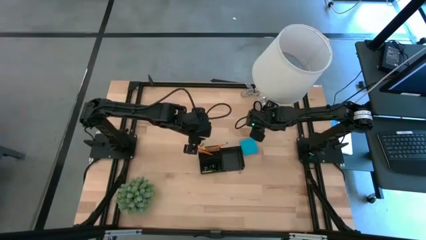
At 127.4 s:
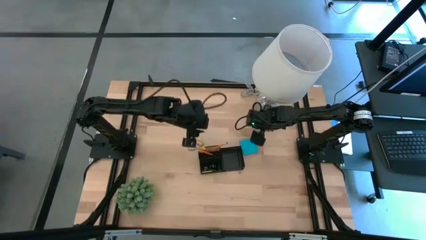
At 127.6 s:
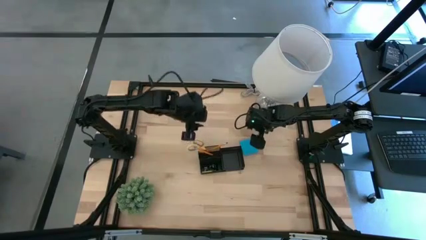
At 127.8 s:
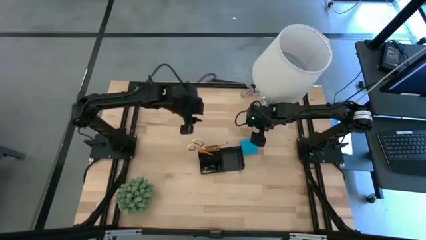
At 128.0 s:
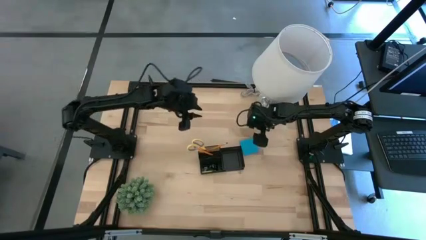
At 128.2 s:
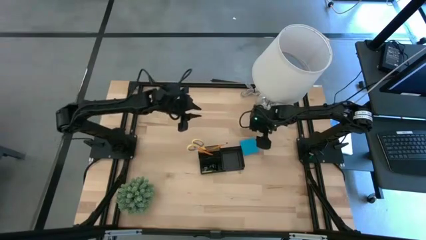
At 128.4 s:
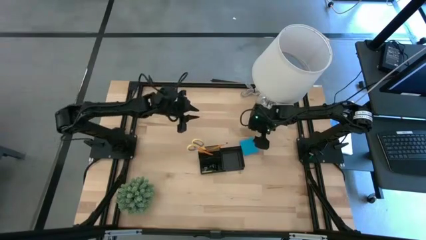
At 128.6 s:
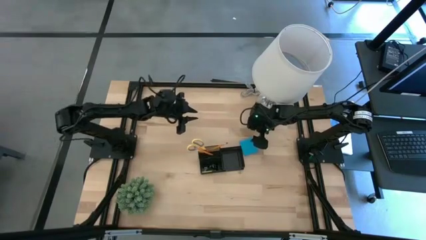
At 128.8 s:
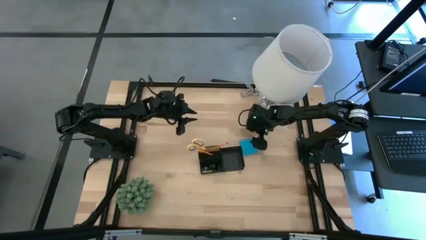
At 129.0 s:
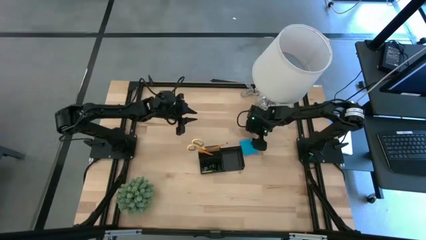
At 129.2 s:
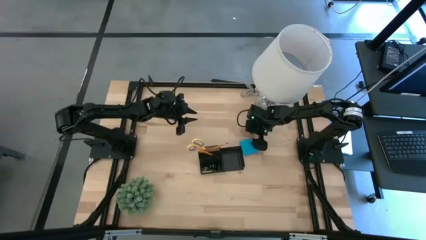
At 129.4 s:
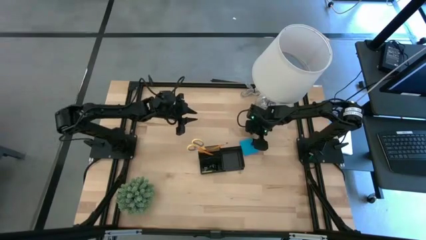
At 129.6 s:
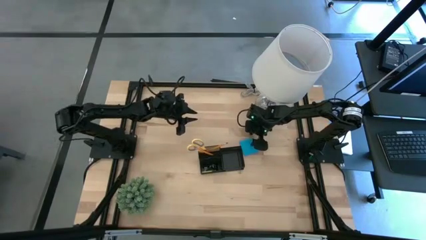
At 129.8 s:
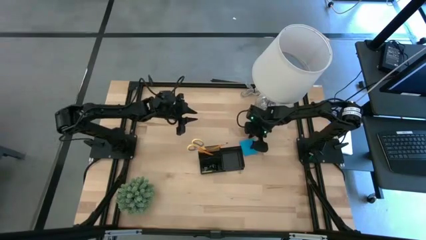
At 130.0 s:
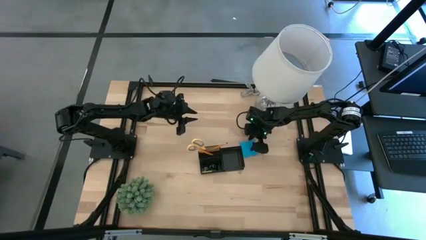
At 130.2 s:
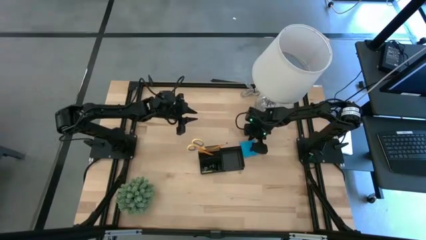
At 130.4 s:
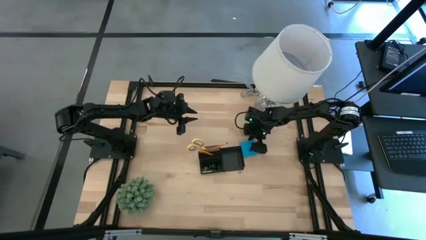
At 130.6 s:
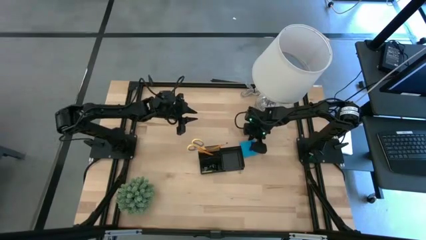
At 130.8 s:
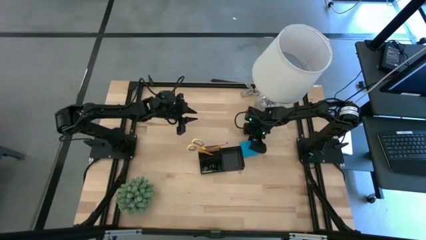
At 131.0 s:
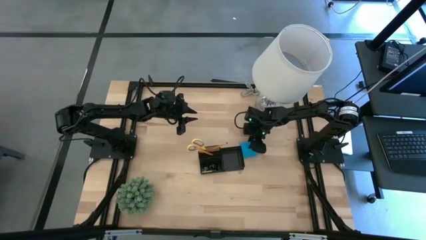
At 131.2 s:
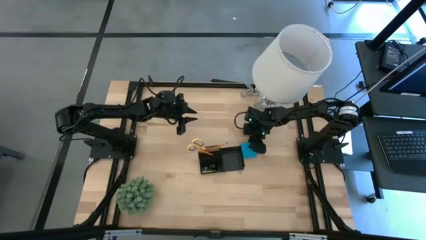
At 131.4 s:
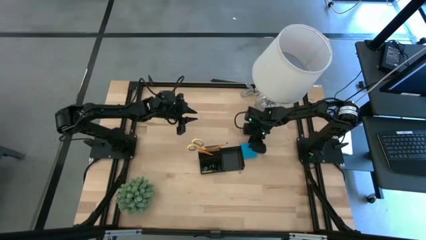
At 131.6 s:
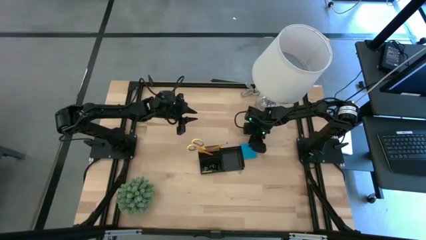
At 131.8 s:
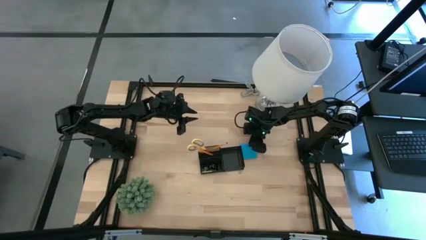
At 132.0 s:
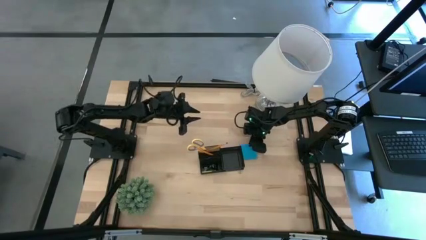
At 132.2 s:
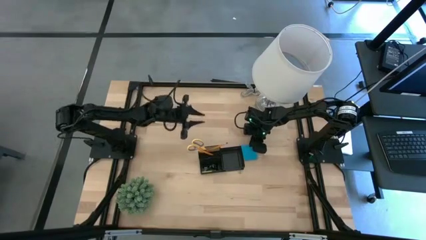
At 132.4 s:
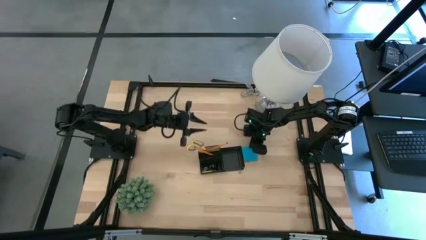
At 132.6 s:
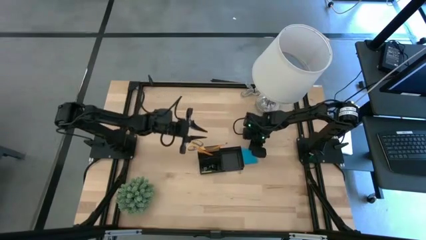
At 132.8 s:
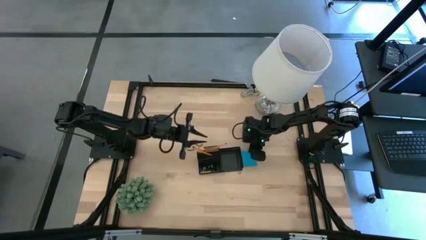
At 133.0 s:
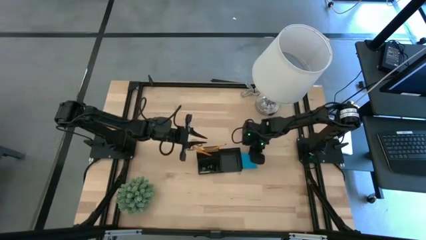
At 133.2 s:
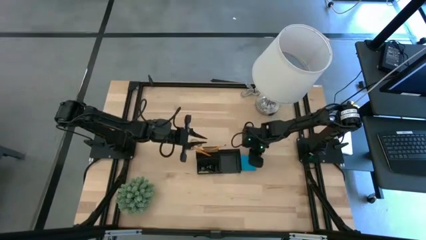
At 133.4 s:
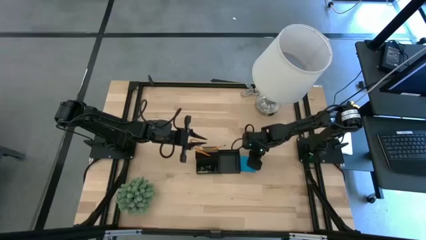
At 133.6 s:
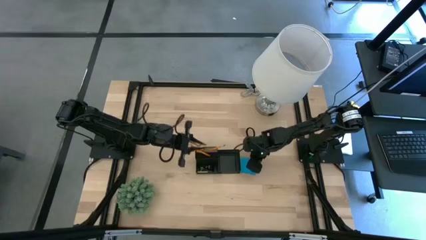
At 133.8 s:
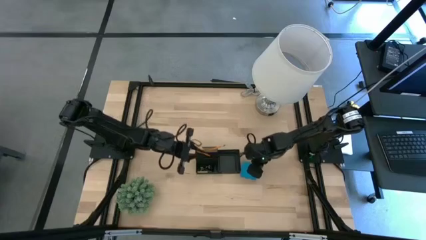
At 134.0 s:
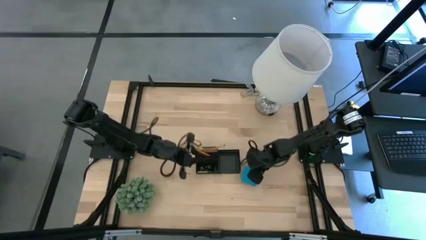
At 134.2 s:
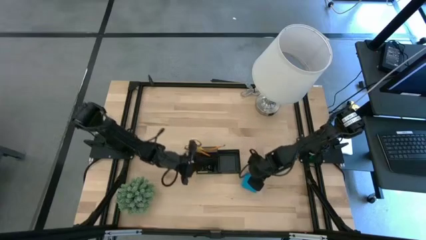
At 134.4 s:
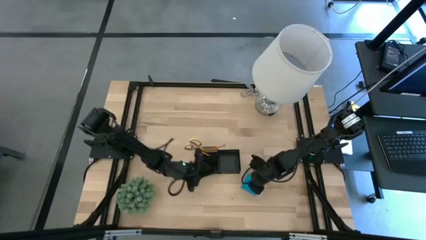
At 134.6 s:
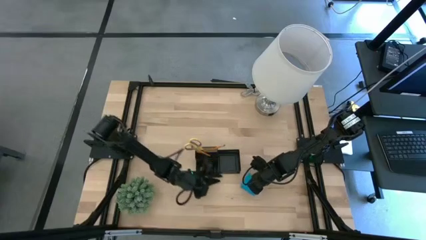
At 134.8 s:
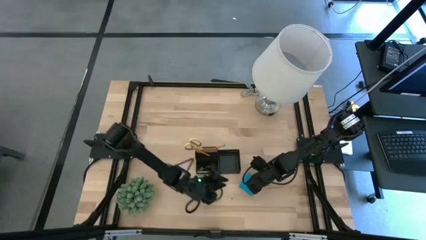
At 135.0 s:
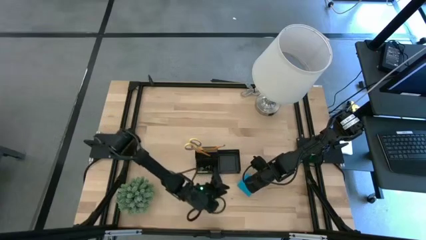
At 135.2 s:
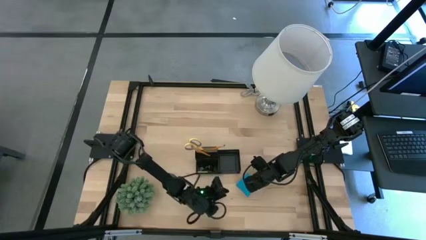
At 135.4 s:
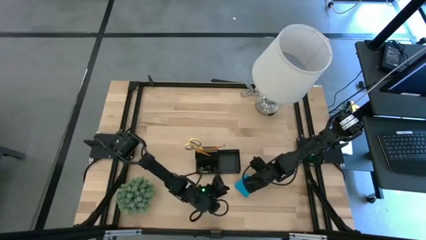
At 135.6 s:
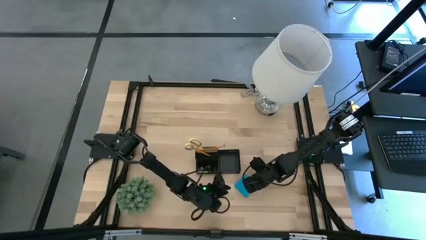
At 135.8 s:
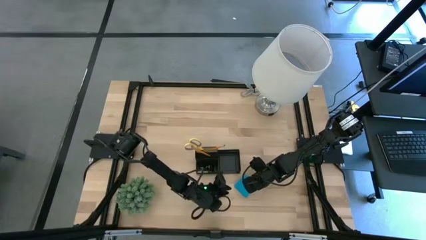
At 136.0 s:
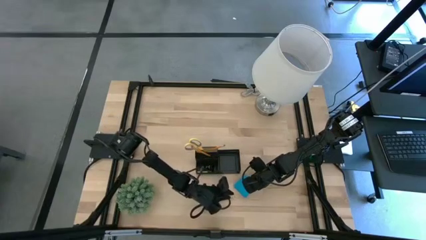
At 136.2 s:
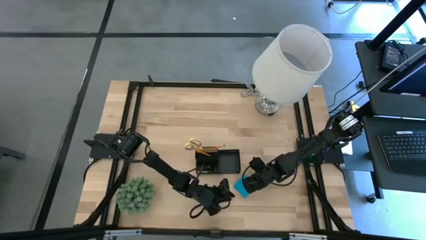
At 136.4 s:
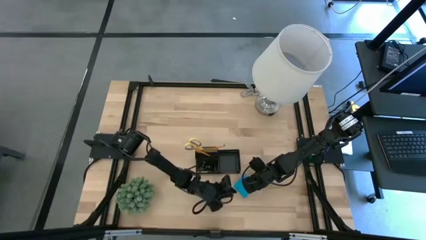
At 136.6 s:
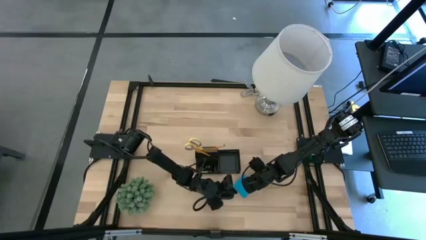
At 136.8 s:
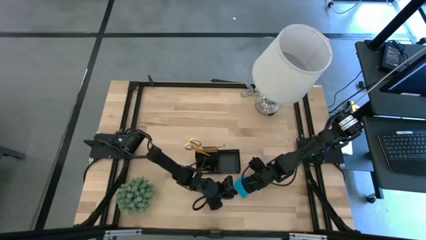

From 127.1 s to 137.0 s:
Task: Pick and place office supplies into organizer
Put the blue sticky notes into the desk organizer

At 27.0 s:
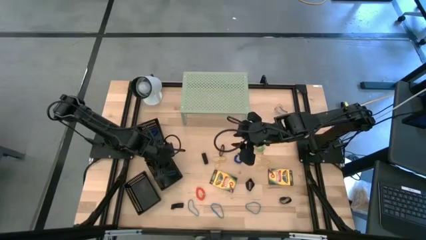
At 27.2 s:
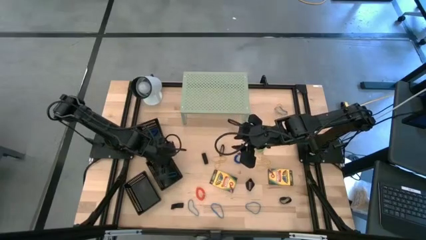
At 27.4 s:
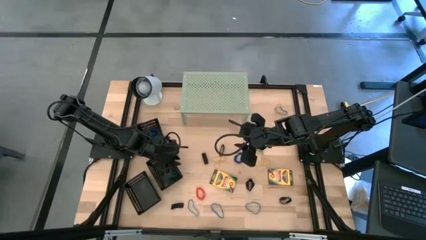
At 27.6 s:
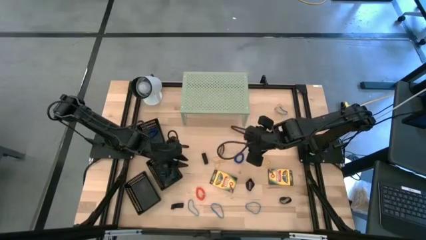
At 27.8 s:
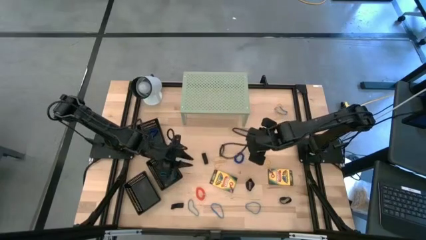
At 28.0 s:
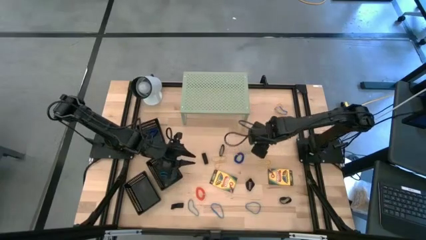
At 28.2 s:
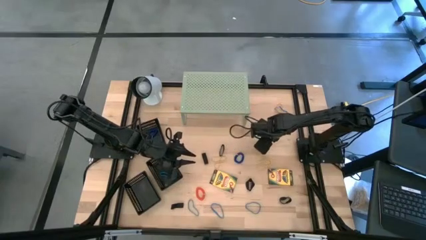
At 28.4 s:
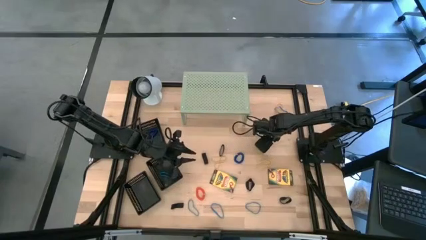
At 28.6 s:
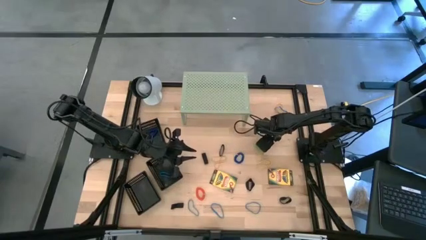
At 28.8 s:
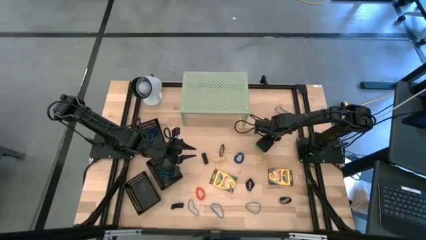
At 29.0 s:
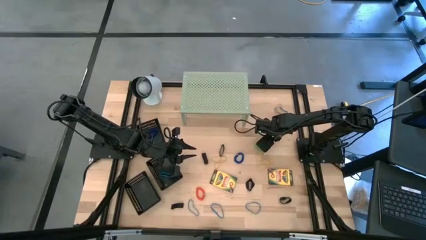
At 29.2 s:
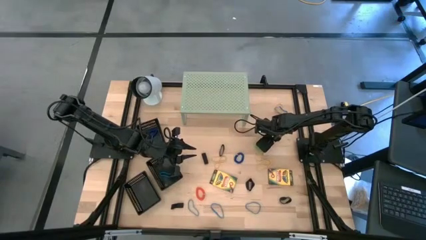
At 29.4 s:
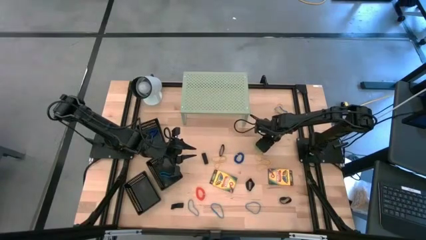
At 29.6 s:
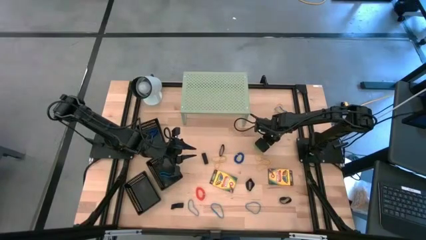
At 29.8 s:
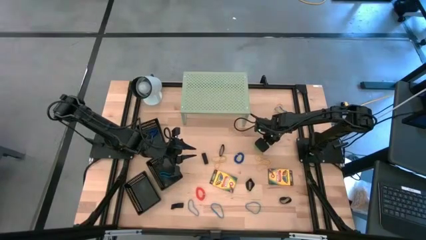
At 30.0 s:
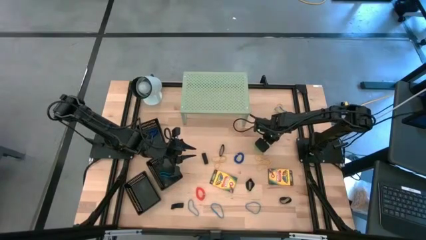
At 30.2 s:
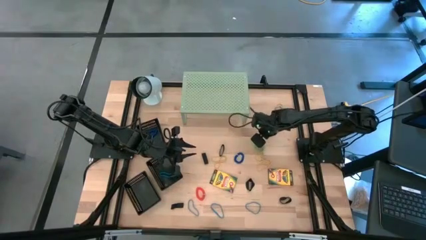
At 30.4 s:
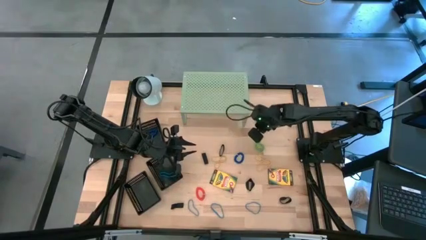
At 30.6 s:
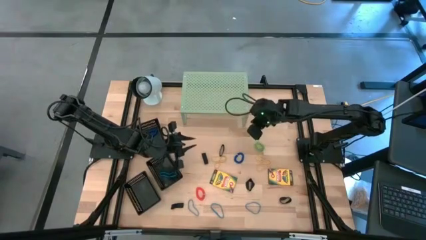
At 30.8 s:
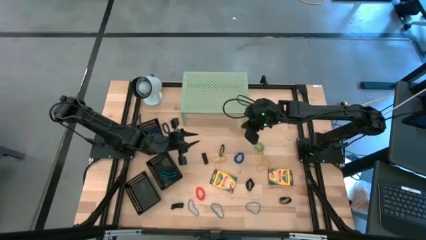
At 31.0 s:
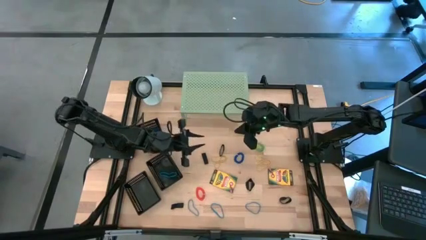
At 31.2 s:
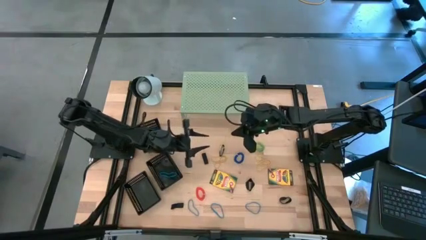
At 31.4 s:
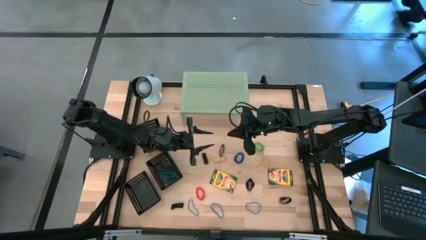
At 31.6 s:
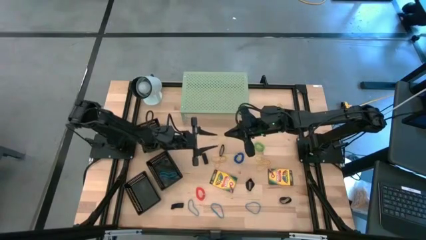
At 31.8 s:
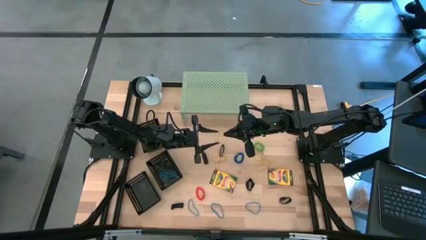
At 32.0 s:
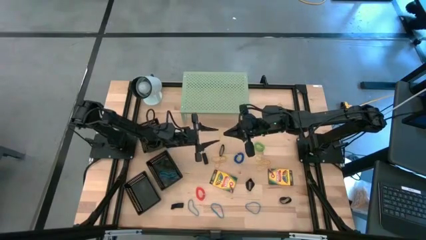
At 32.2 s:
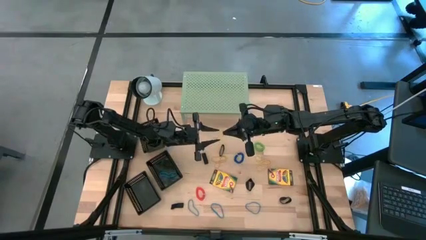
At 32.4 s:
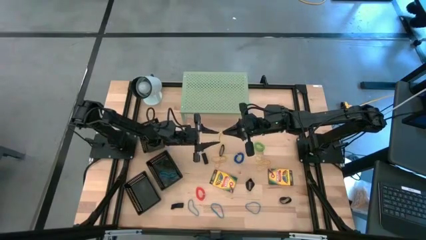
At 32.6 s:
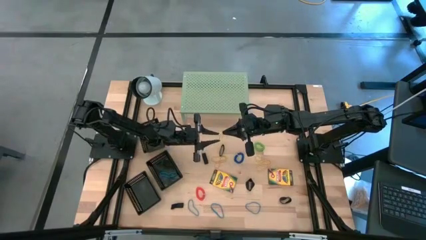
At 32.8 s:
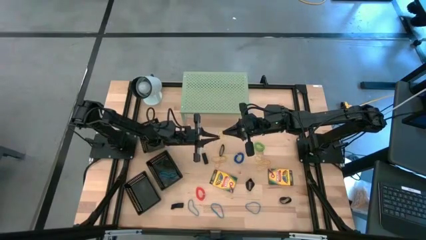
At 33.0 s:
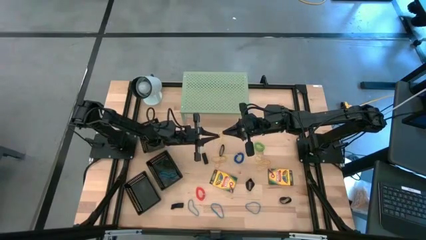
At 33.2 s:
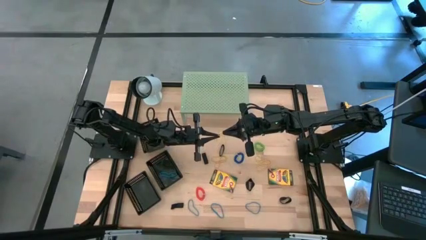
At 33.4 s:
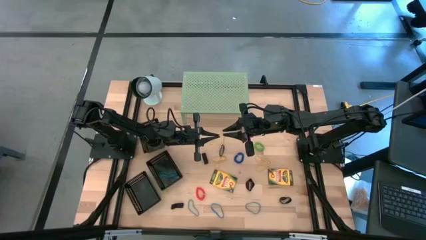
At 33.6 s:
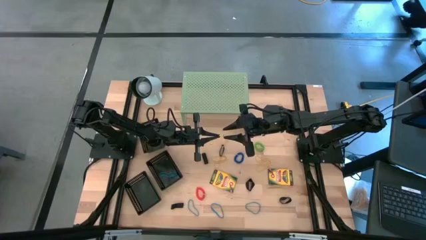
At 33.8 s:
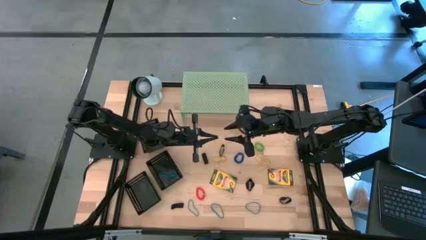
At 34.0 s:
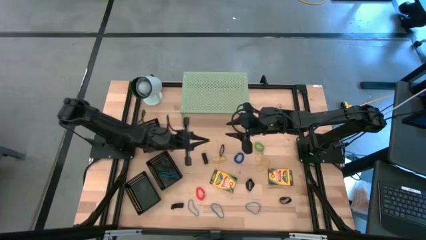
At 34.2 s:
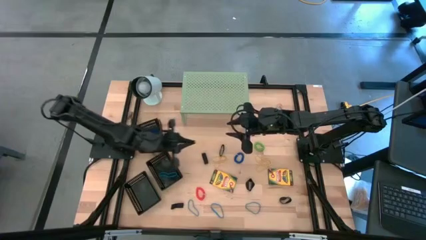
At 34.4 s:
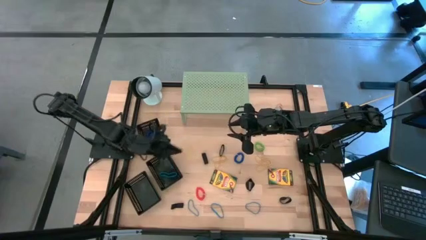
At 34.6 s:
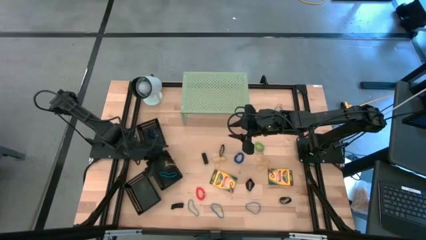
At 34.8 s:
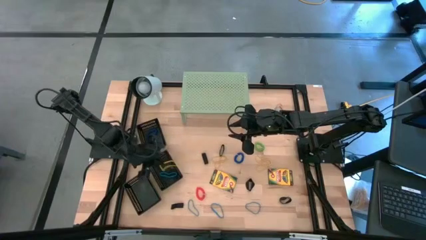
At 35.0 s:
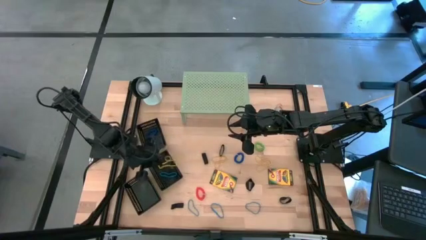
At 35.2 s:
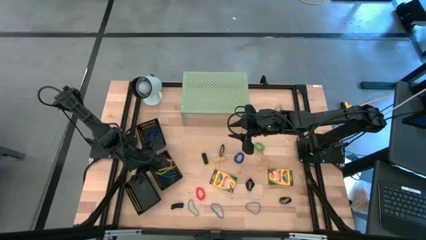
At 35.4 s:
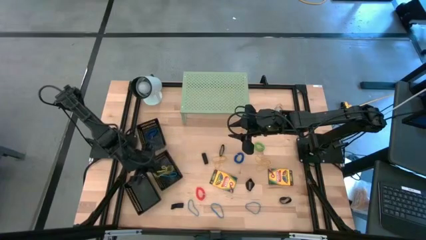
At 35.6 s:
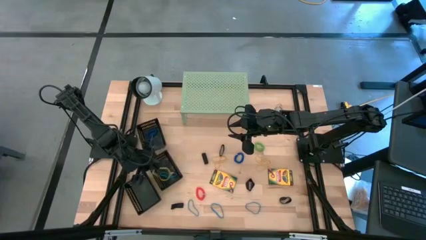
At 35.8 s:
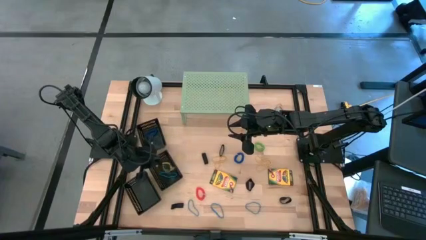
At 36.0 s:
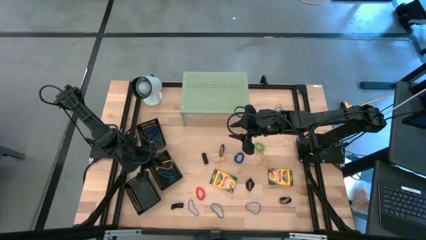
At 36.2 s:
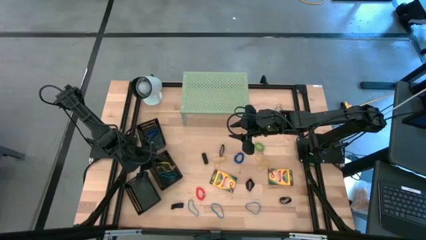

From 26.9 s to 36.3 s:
Task: Pick & Place Office Desk Supplies
Put the yellow rubber band into the middle black bin
